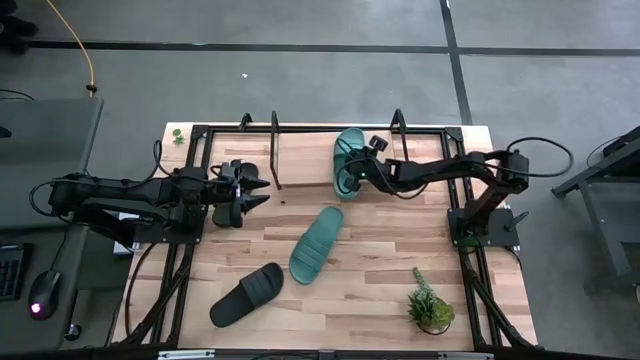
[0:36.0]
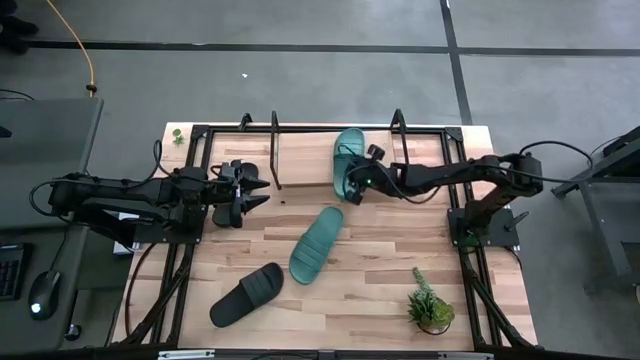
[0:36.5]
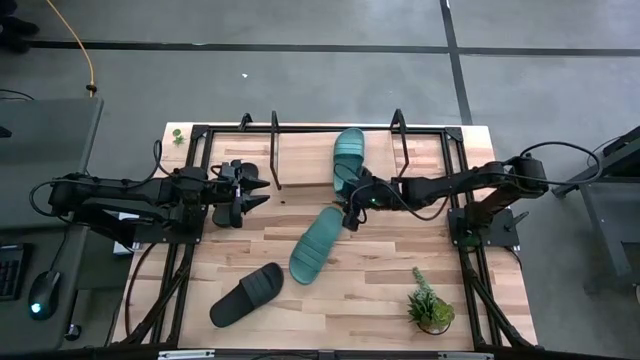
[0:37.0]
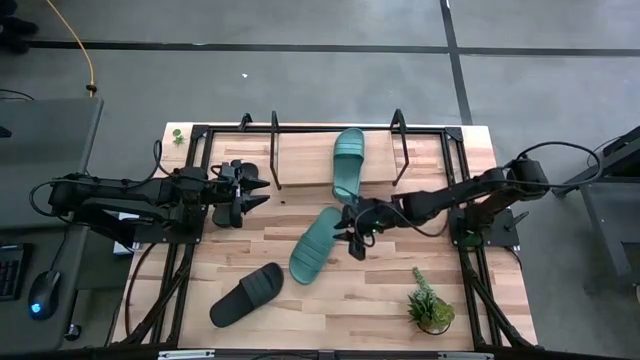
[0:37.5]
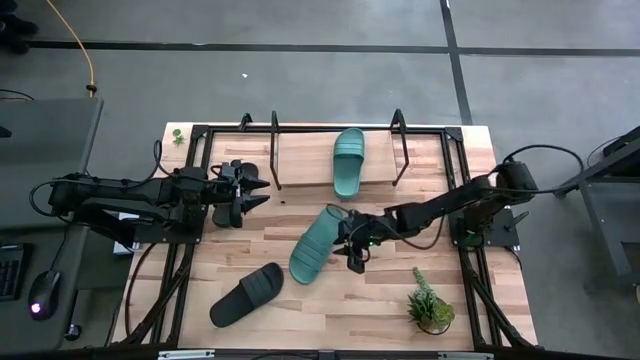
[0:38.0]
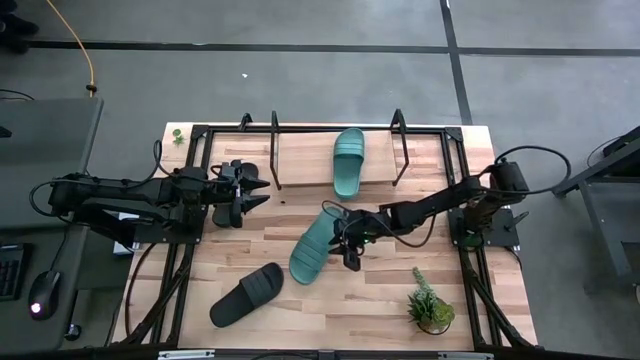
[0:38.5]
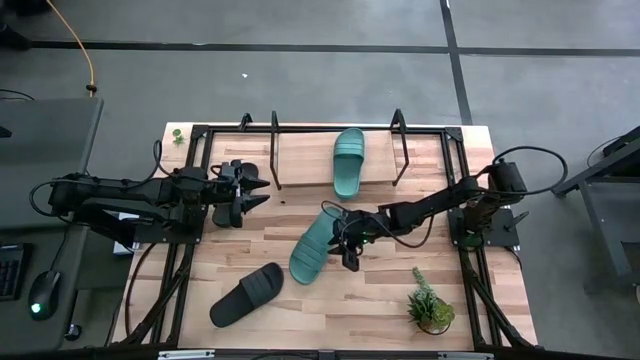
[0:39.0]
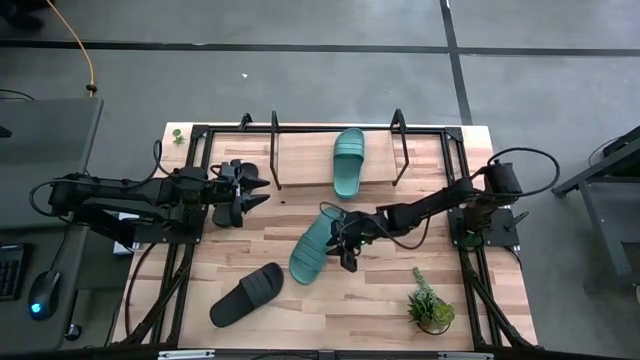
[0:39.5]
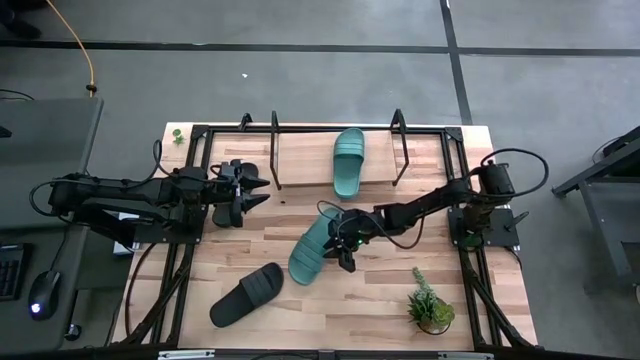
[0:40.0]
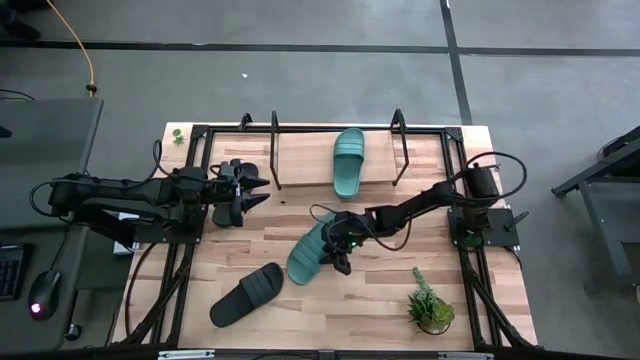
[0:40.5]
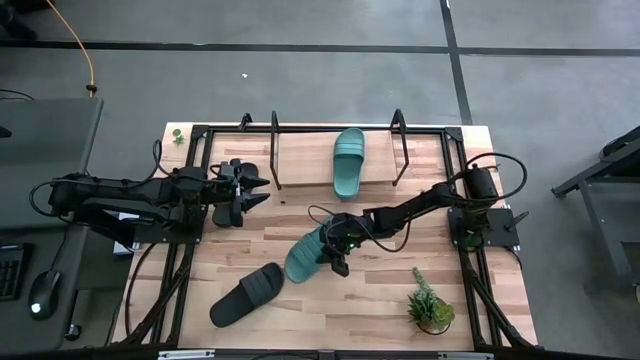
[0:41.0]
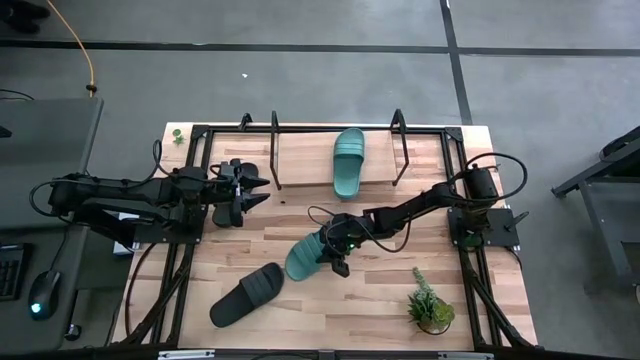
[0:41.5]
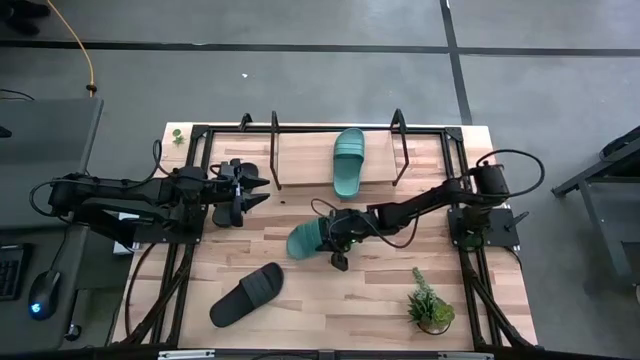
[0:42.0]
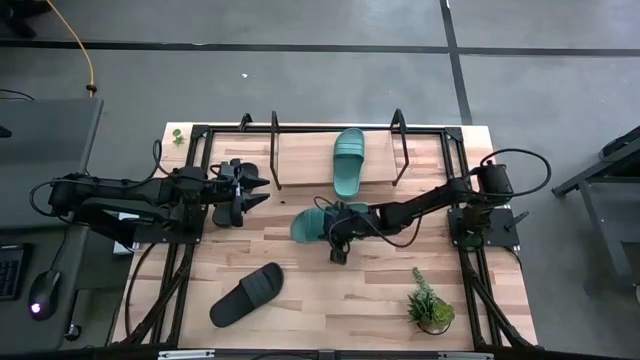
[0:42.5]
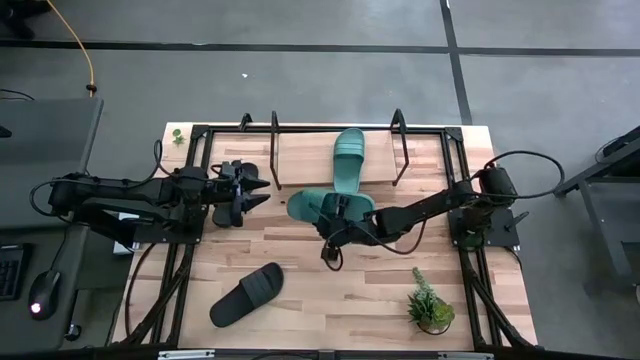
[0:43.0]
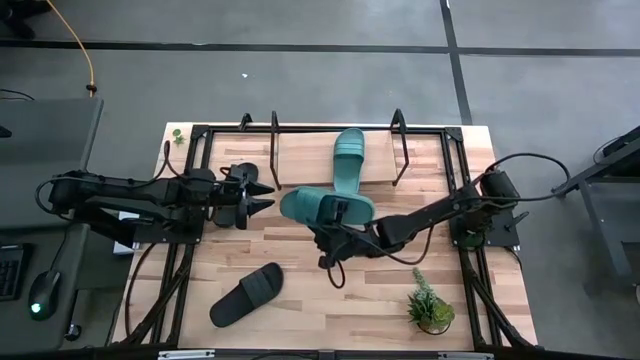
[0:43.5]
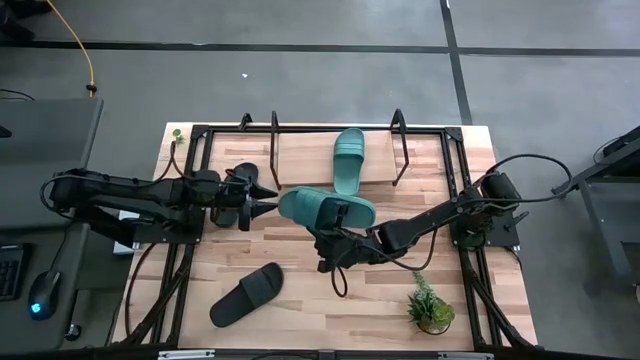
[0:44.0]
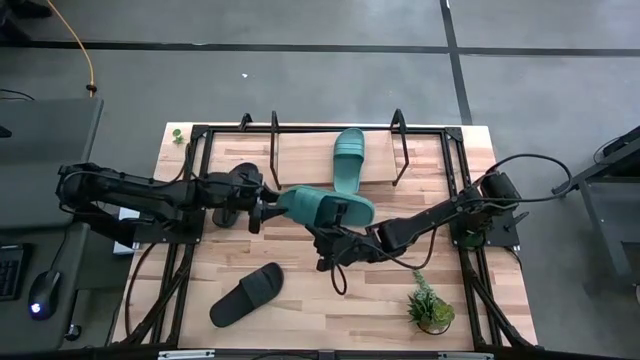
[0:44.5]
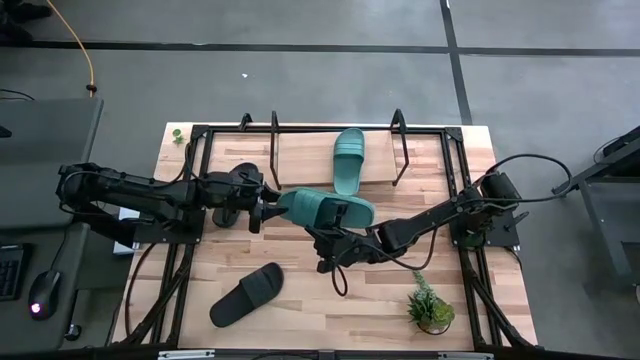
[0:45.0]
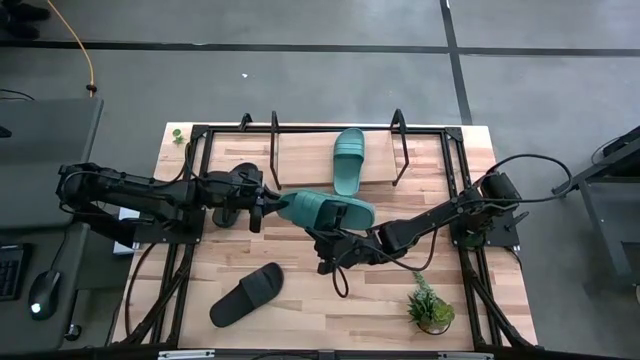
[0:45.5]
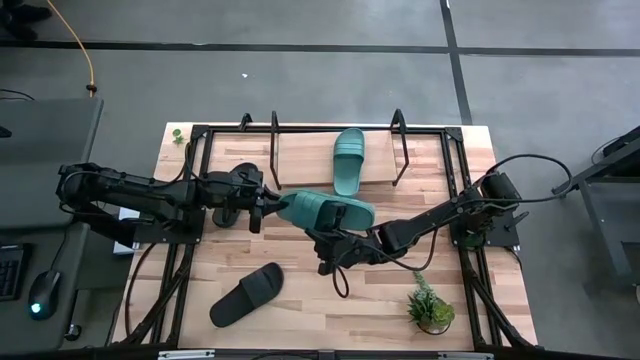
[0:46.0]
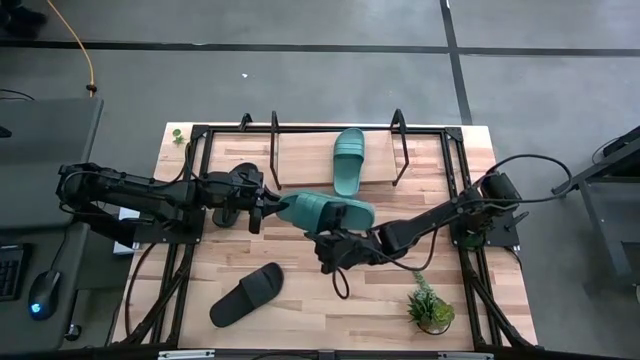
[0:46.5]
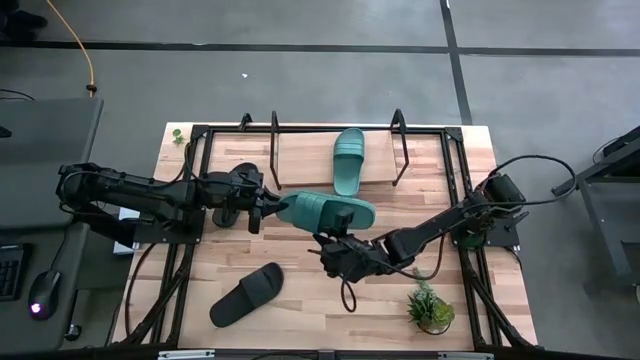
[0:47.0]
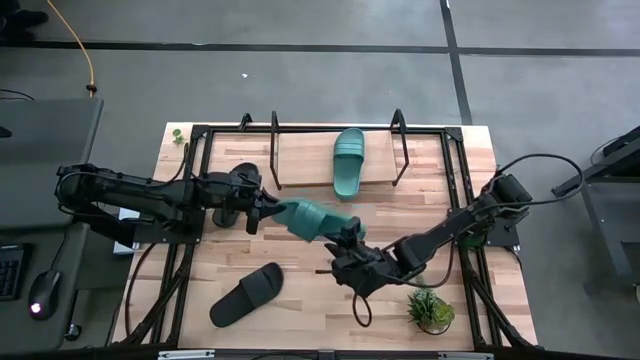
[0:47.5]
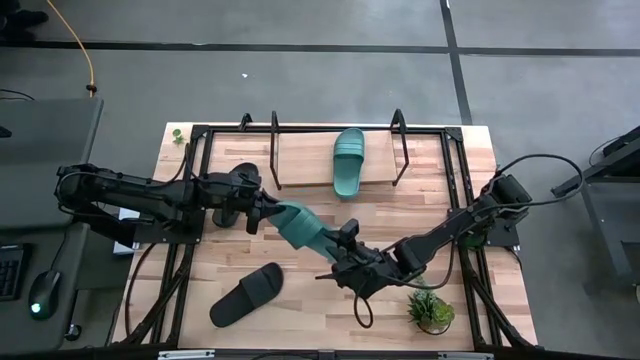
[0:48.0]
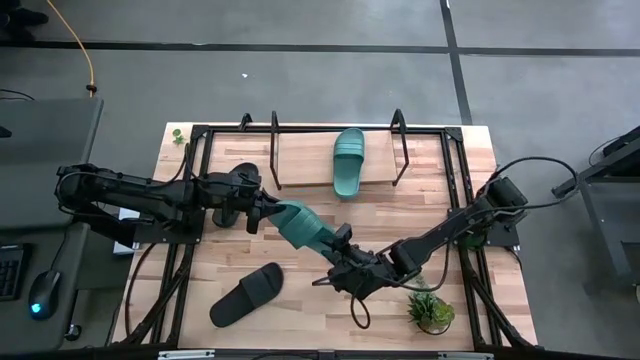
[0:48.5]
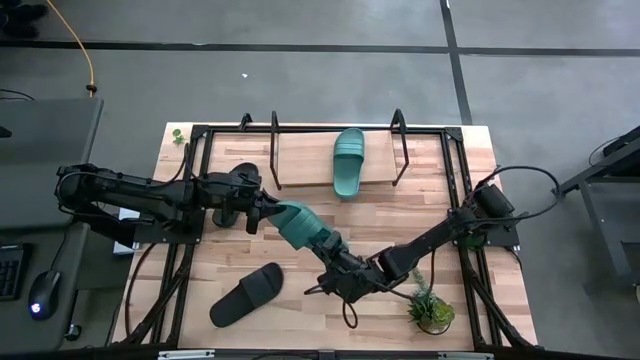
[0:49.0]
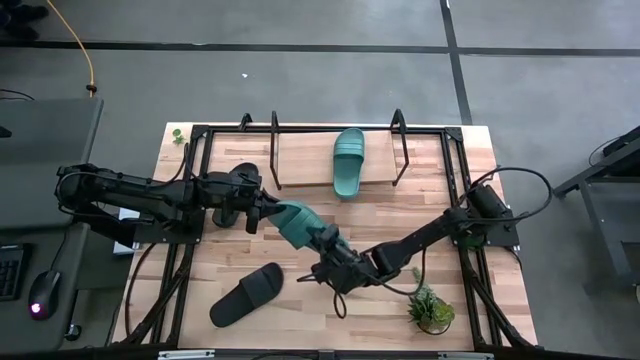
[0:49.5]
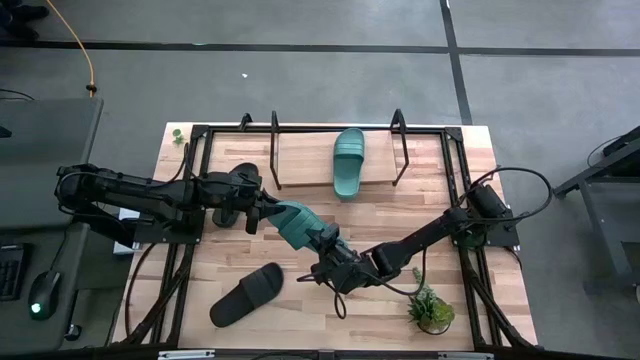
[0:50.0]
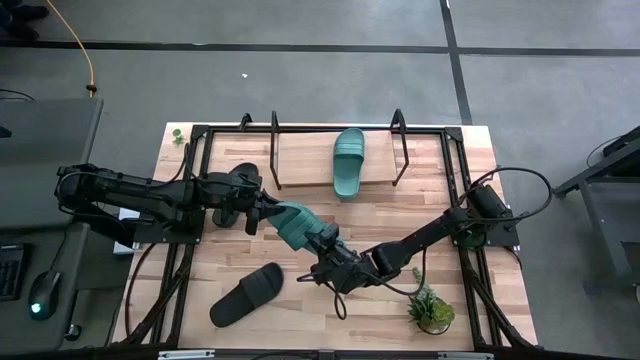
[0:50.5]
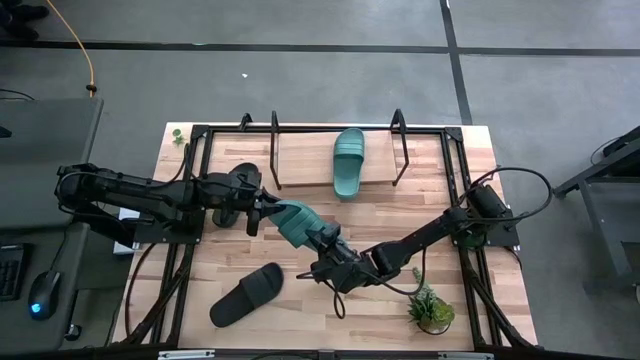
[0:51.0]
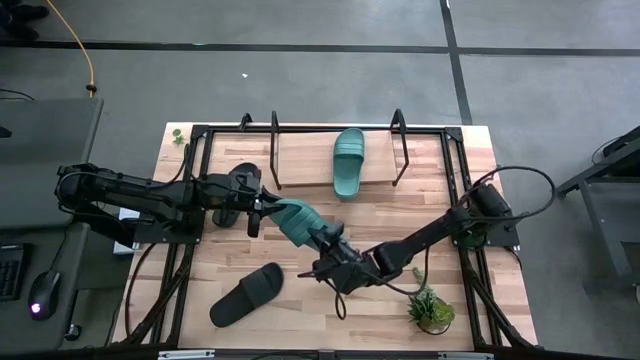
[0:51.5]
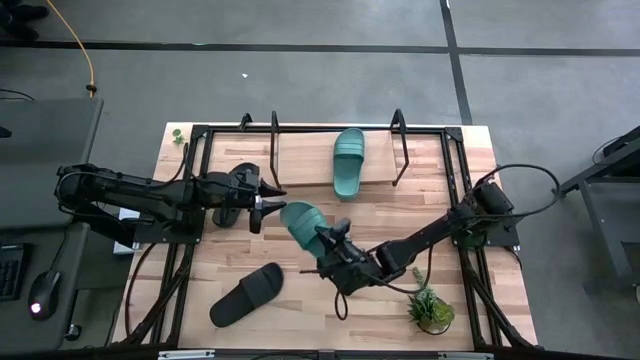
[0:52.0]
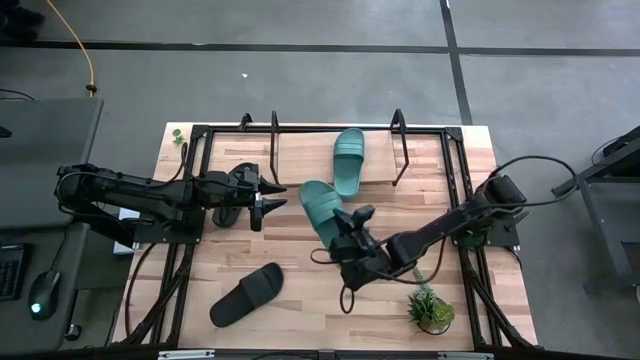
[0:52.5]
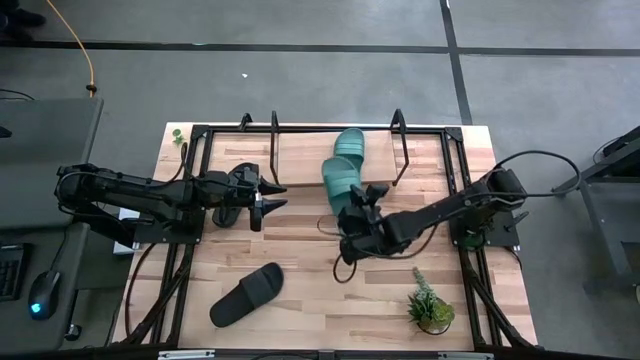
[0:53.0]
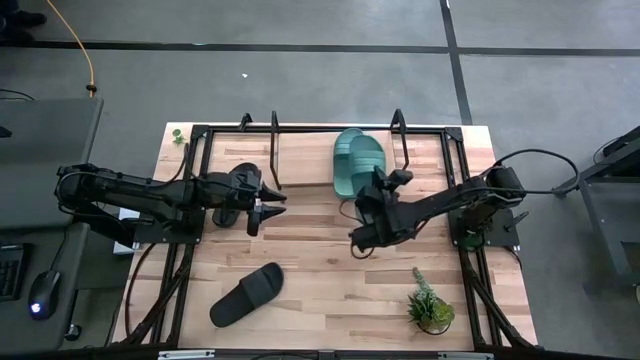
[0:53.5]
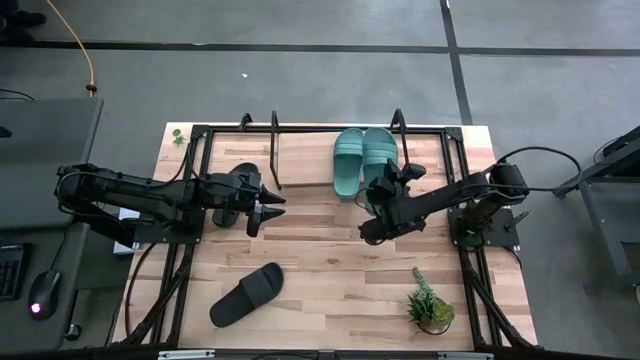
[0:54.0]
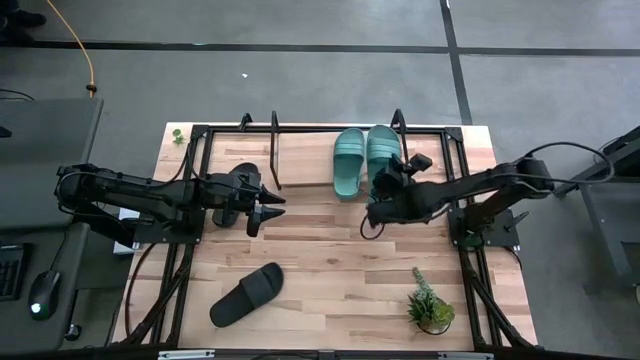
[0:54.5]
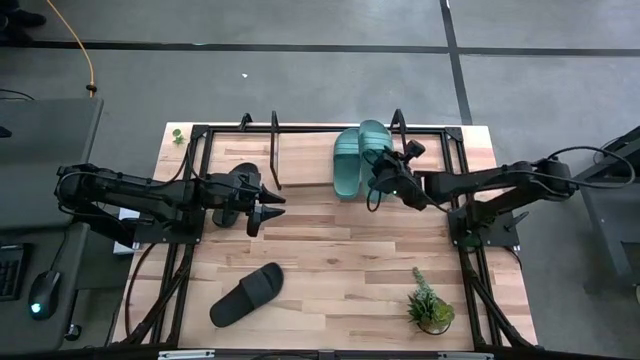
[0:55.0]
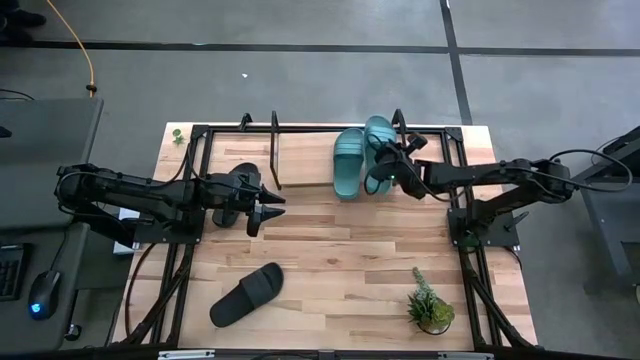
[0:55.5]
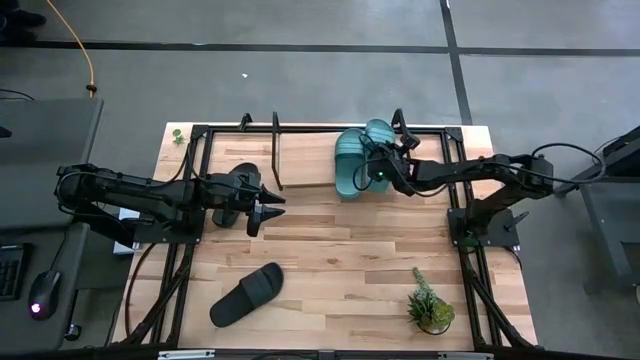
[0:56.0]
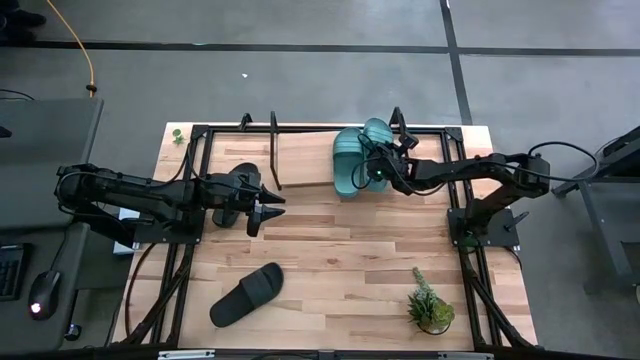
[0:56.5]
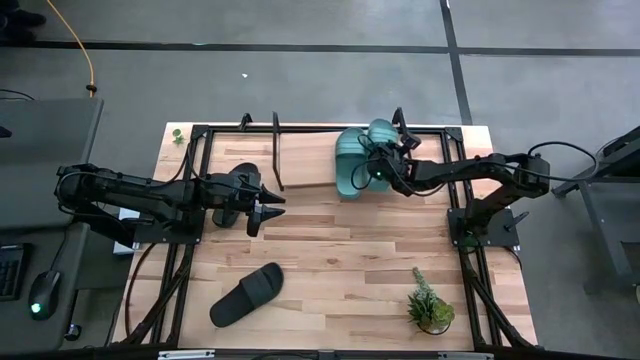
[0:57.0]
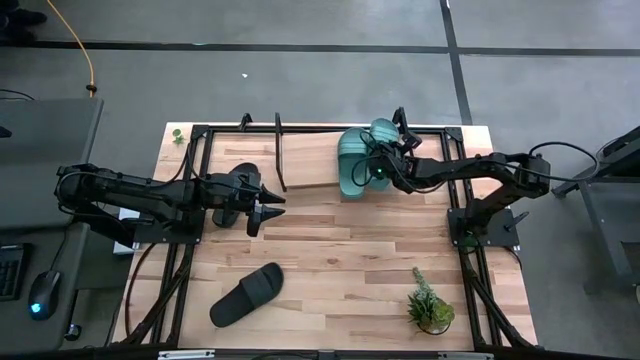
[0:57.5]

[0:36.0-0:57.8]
Task: Pick and place slides into the shelf
Put the green slipper on the shelf

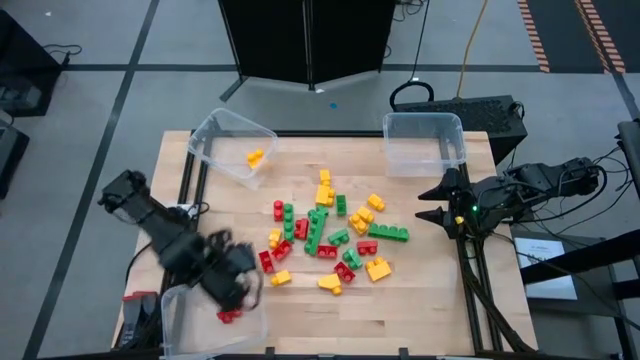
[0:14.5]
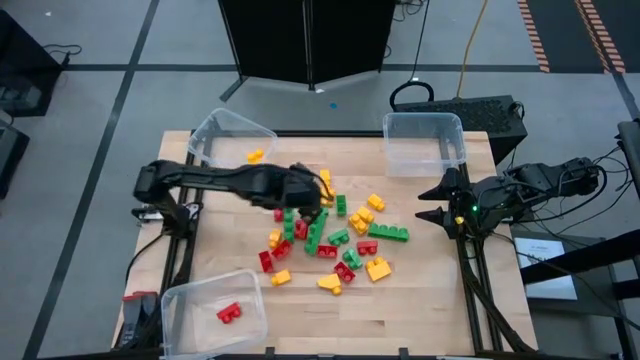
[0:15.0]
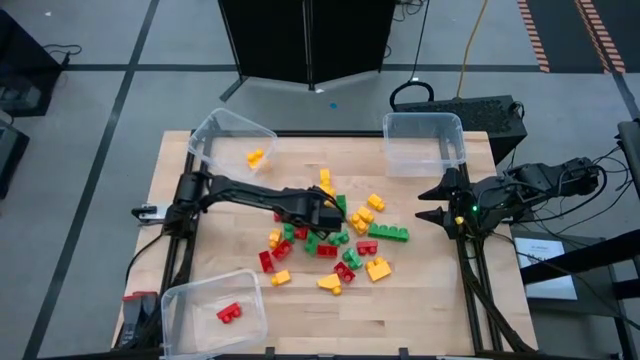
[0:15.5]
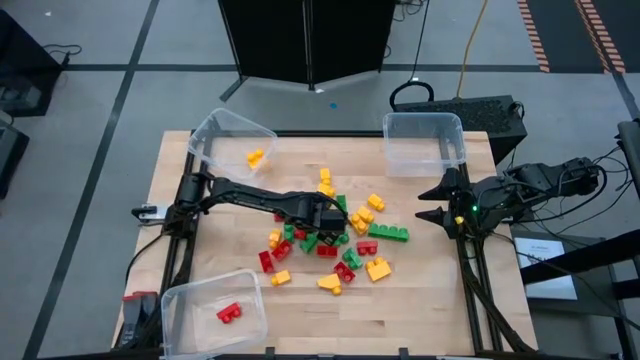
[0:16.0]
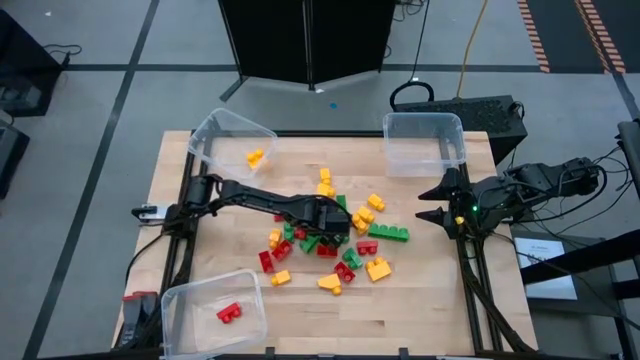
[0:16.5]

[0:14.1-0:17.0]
Task: Sort blocks
Put the green game piece into the top right transparent bin
